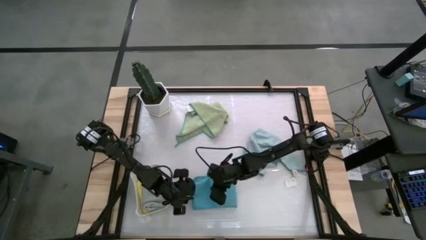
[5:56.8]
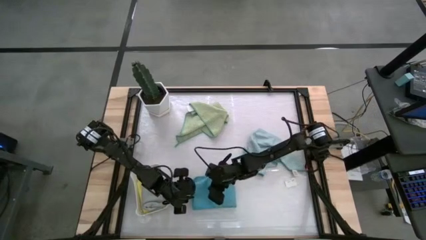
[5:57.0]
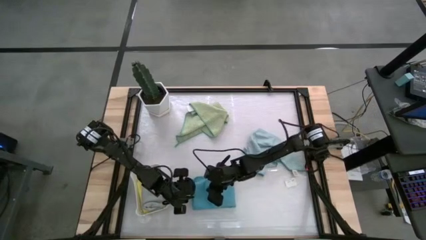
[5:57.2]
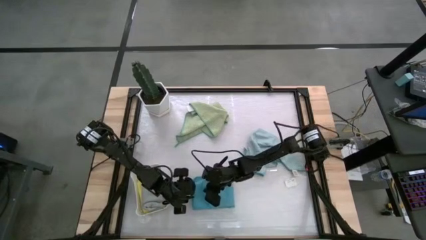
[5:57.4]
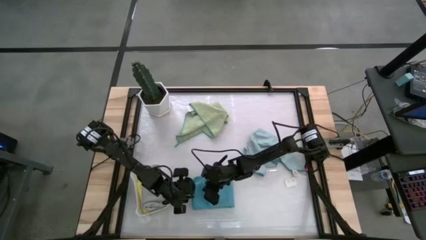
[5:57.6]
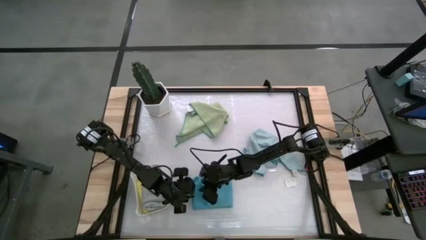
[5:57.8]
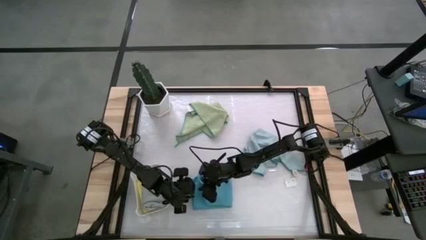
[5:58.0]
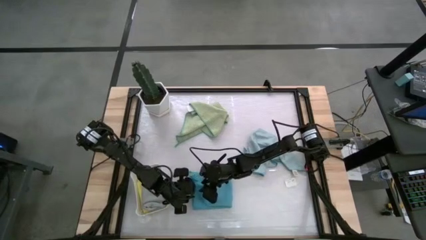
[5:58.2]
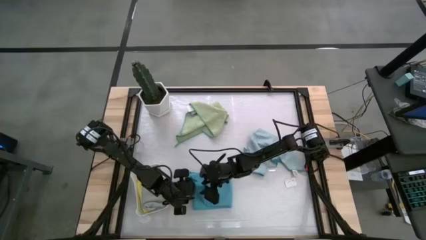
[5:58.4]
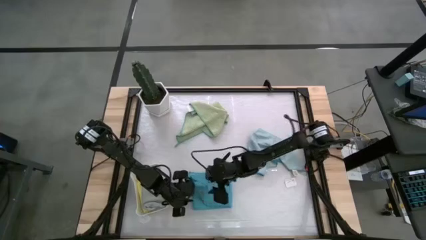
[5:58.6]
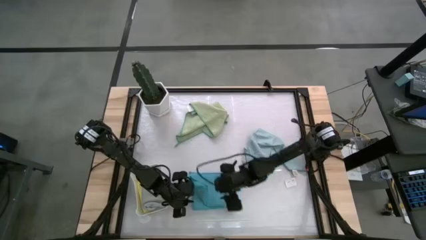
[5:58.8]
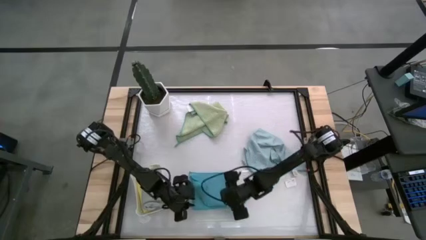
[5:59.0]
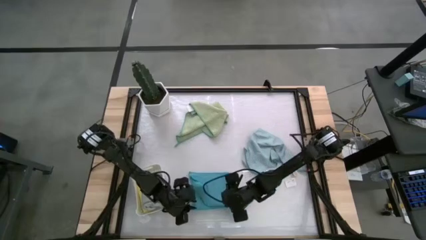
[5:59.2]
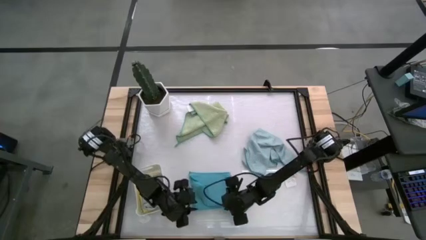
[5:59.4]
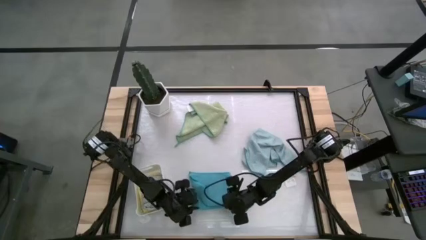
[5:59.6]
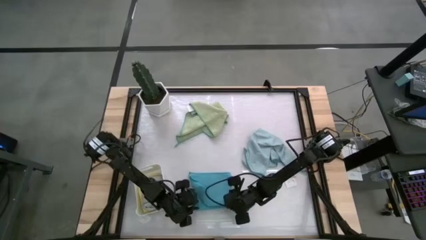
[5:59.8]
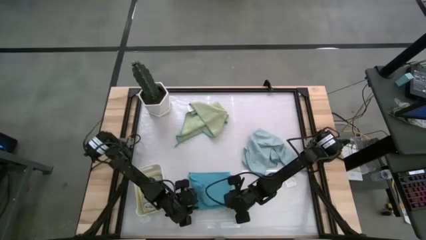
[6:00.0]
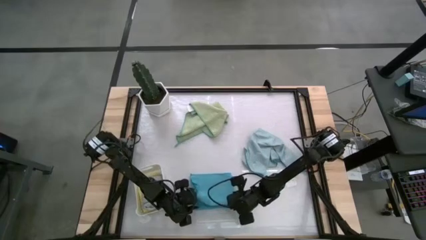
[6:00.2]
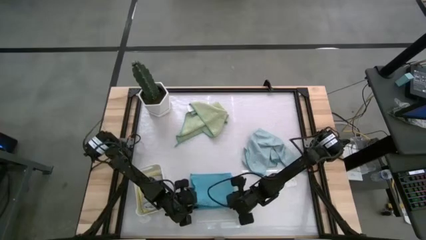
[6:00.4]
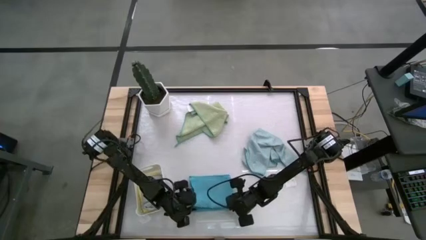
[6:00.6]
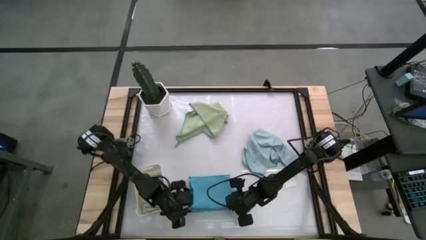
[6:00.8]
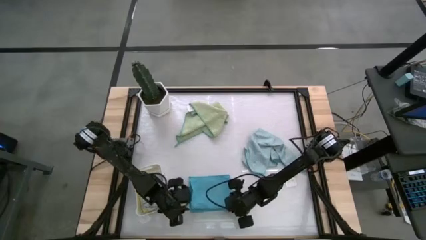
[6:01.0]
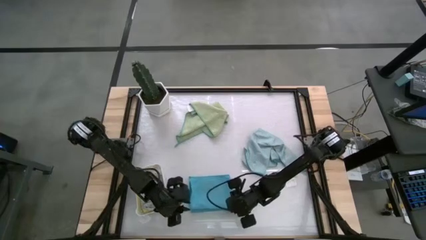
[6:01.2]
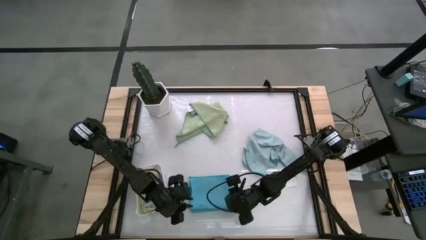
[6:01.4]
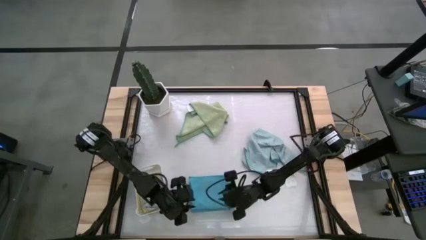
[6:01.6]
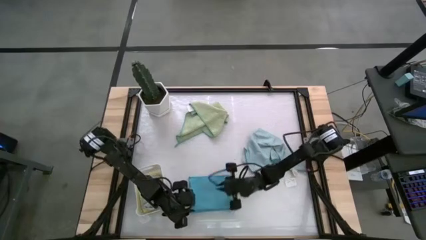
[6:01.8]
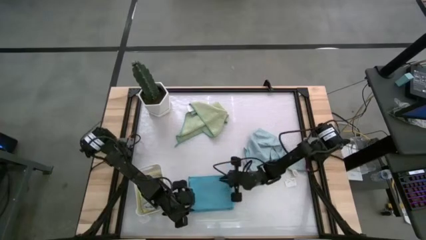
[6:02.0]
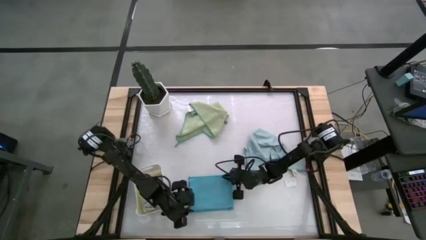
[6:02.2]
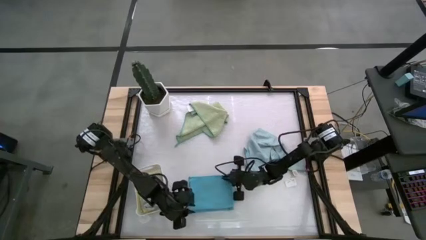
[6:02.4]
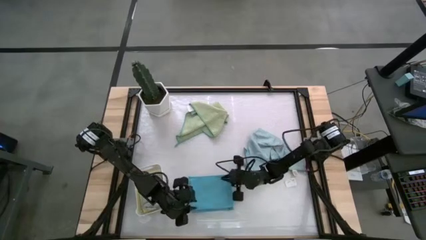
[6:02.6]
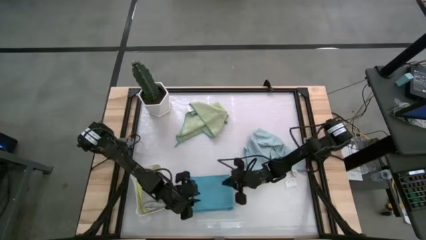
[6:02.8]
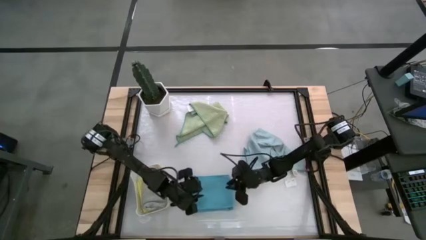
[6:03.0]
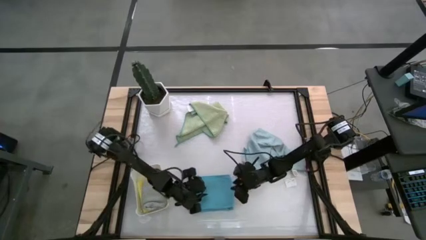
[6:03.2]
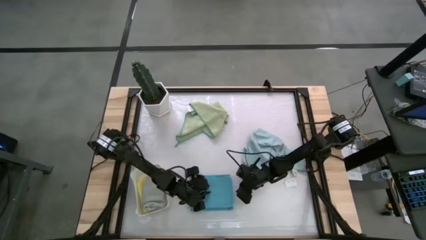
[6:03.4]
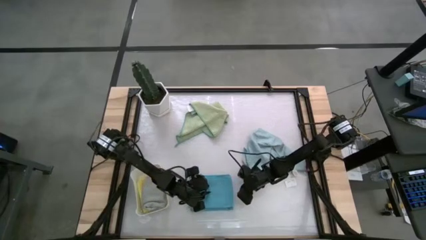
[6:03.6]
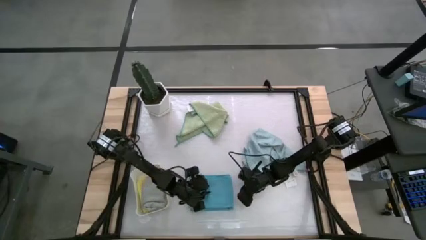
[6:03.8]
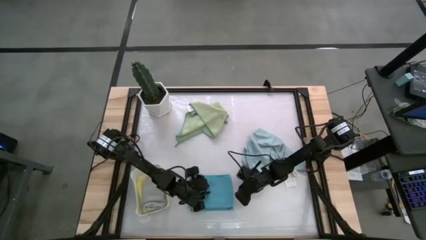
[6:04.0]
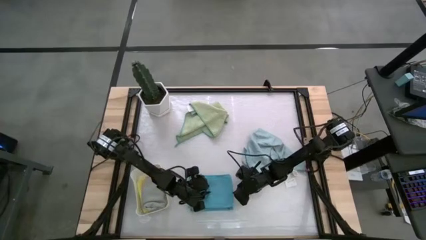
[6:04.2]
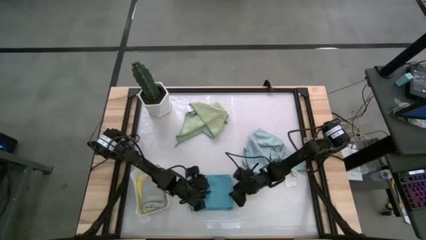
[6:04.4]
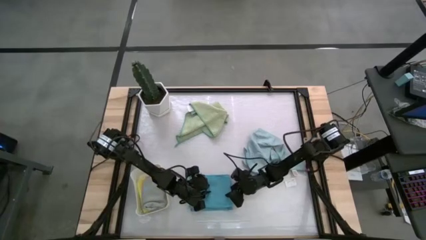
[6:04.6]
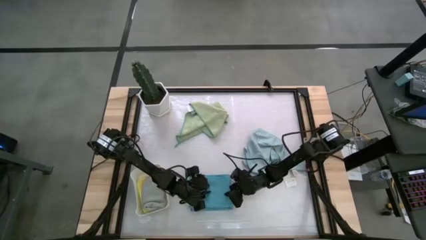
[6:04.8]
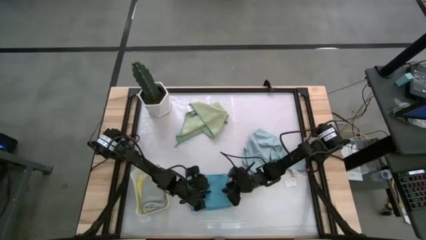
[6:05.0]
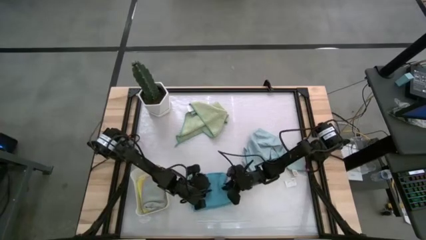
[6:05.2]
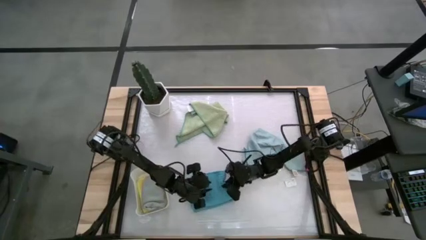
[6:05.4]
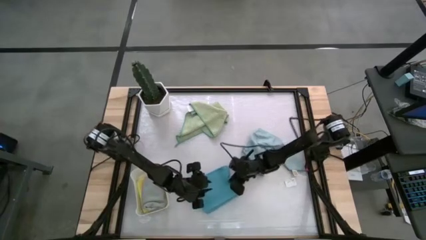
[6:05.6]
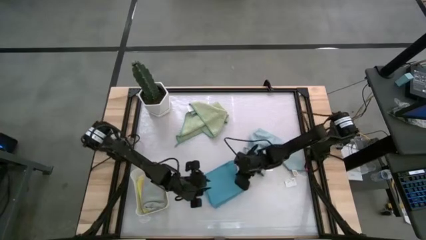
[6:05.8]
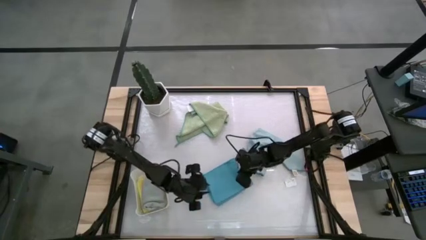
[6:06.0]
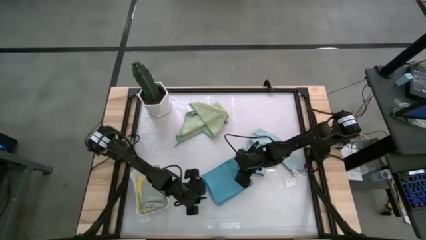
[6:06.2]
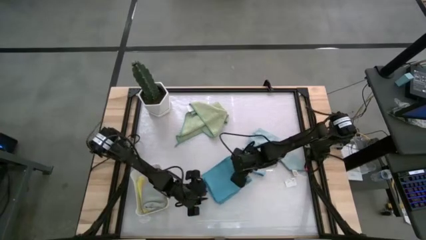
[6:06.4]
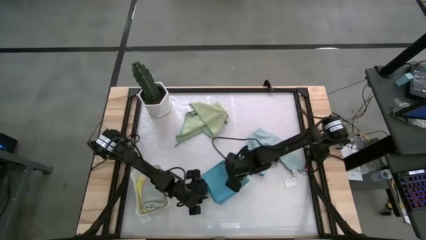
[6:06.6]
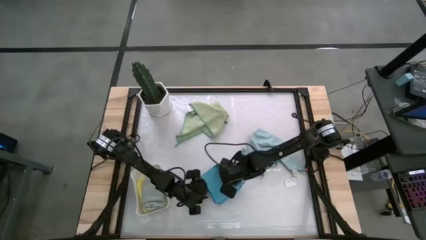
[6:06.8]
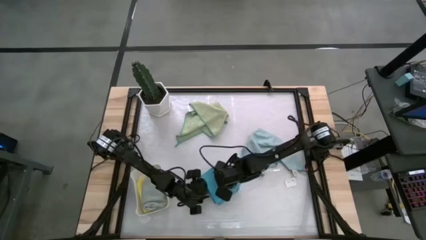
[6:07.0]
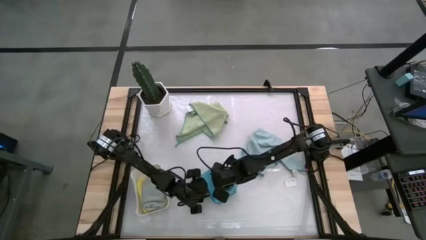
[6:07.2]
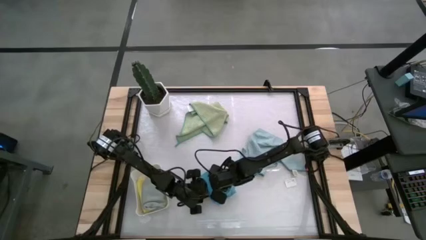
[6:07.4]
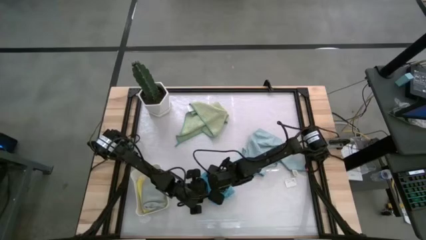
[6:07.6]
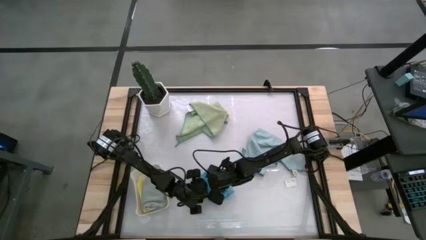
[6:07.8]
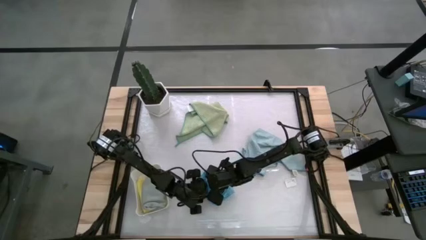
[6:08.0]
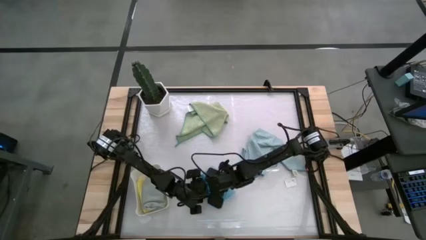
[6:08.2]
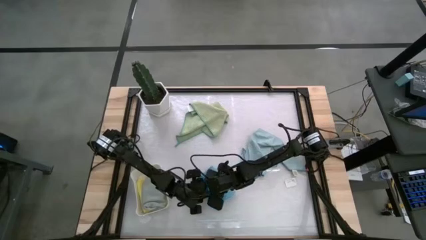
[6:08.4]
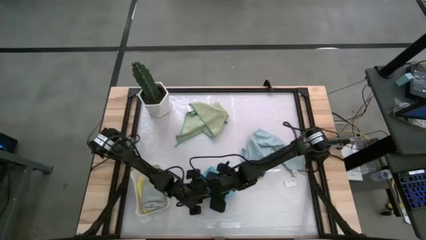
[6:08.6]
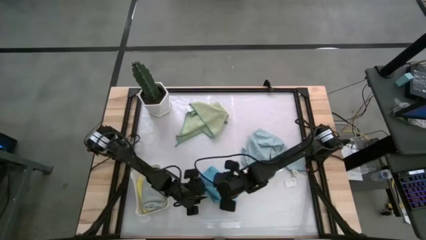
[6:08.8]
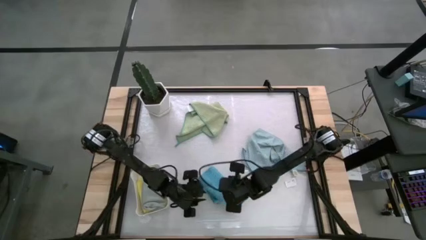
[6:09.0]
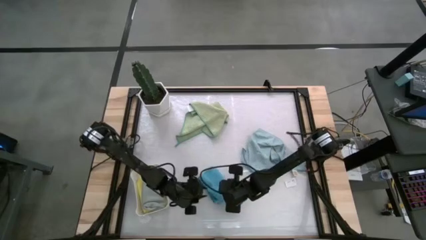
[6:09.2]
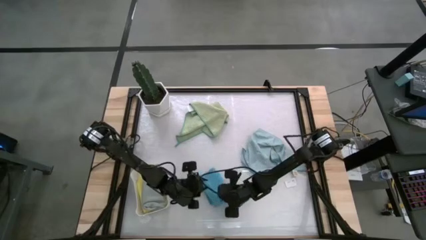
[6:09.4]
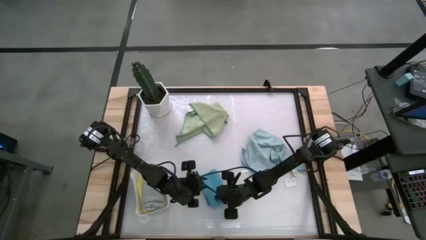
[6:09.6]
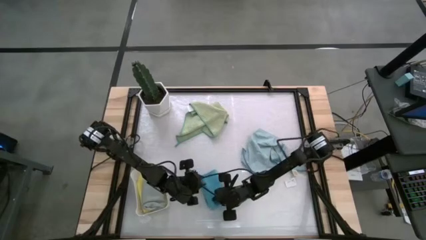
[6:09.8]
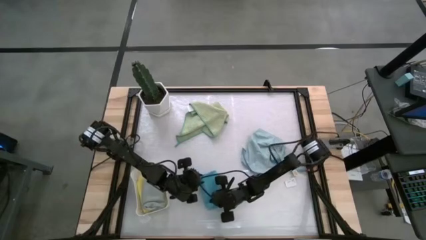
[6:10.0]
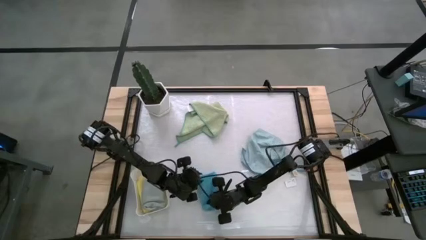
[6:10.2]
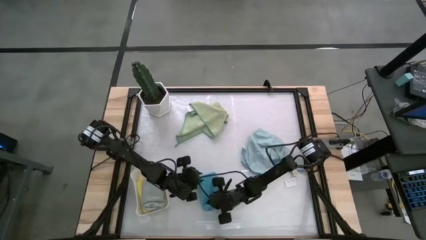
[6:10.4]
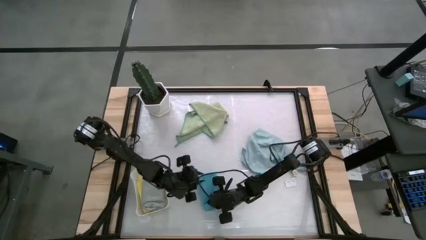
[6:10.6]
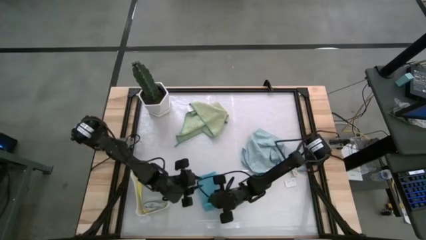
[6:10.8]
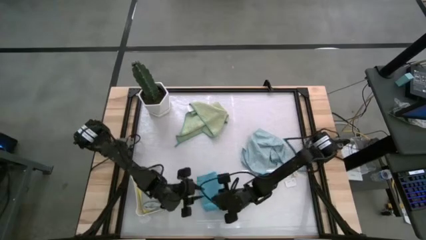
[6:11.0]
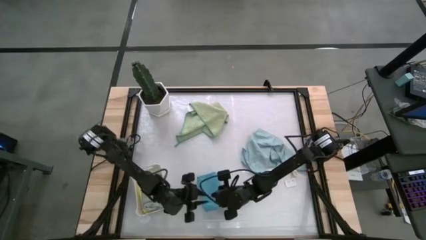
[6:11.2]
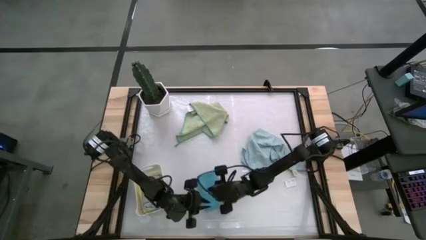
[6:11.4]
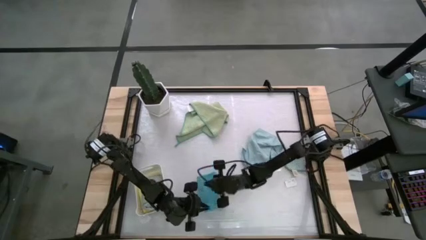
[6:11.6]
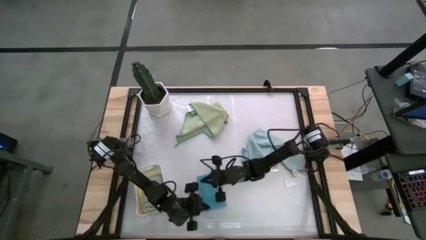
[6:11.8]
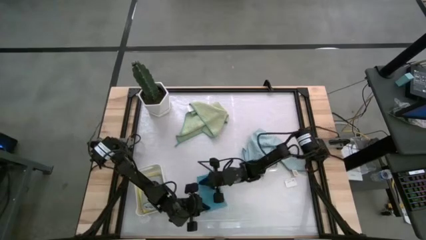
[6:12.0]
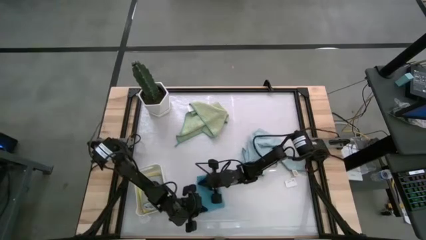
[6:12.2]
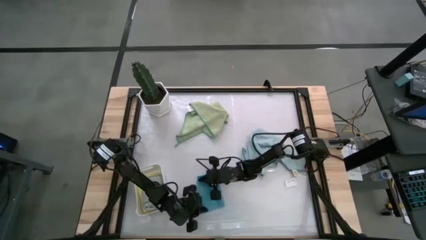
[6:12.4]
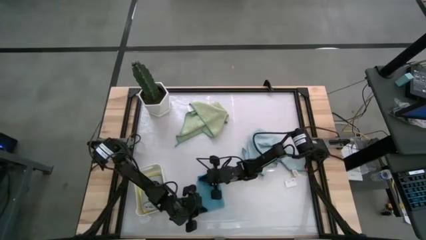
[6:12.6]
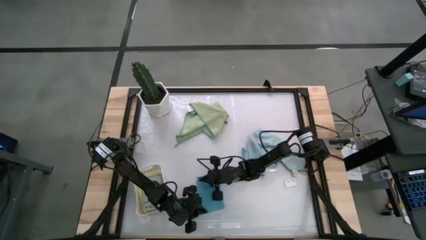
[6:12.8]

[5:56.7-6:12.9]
Task: Fold microfiber towels
Fold the blue microfiber towel
